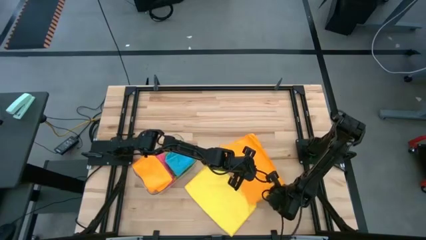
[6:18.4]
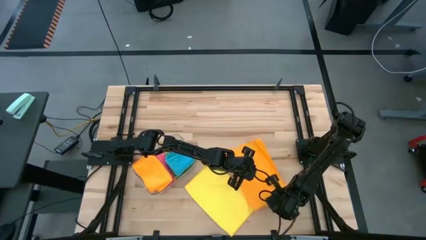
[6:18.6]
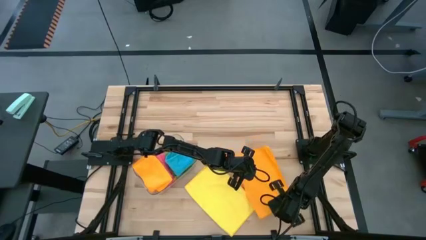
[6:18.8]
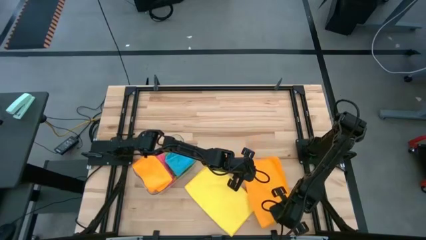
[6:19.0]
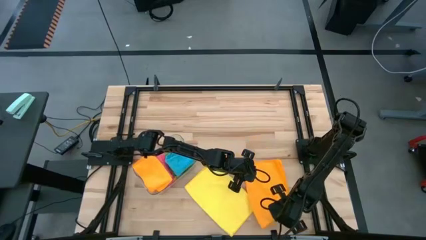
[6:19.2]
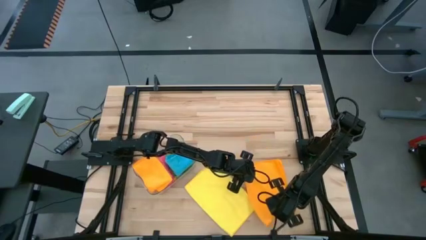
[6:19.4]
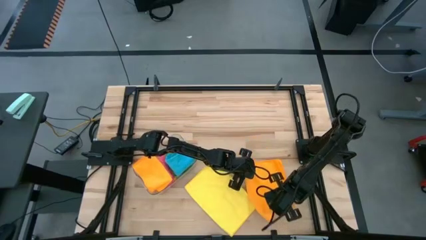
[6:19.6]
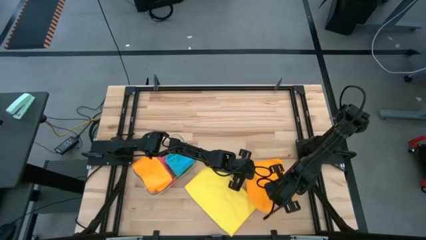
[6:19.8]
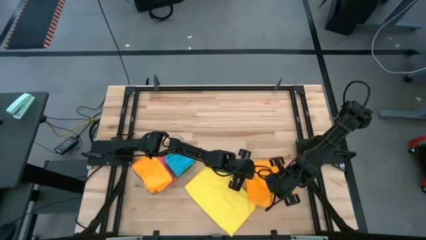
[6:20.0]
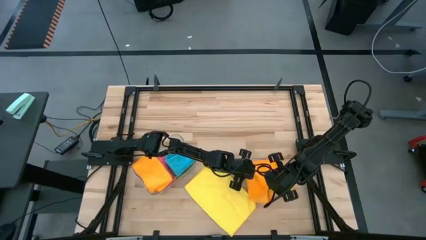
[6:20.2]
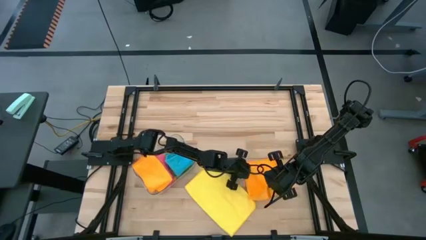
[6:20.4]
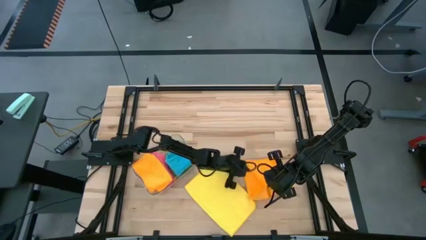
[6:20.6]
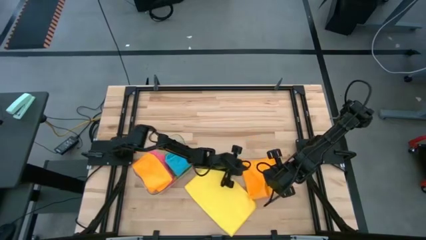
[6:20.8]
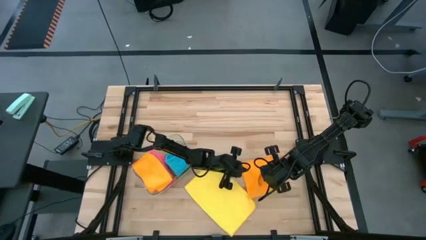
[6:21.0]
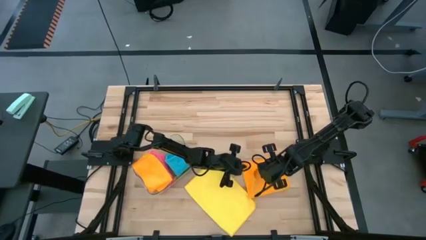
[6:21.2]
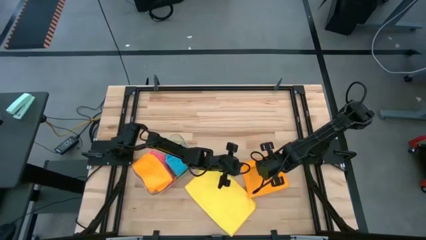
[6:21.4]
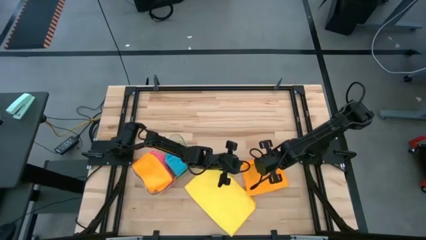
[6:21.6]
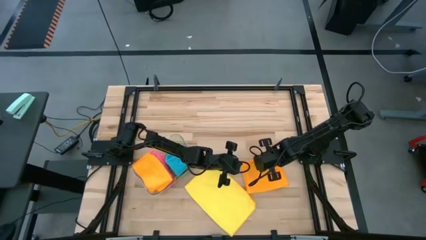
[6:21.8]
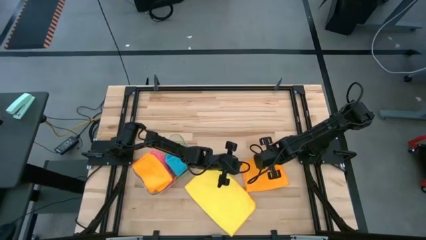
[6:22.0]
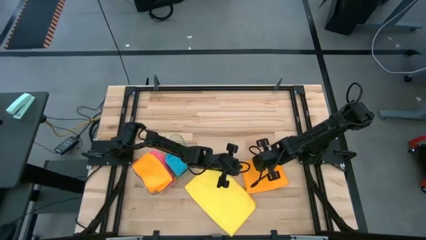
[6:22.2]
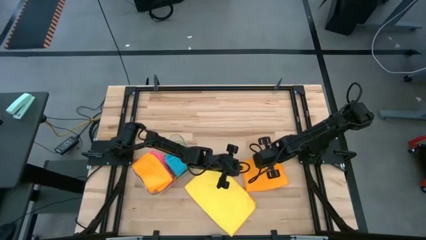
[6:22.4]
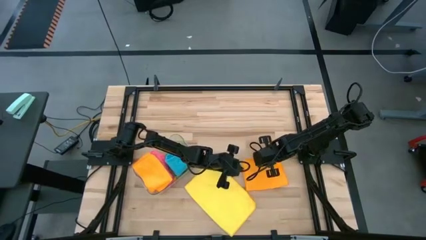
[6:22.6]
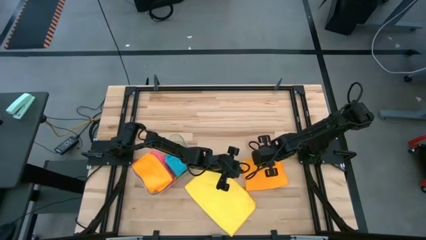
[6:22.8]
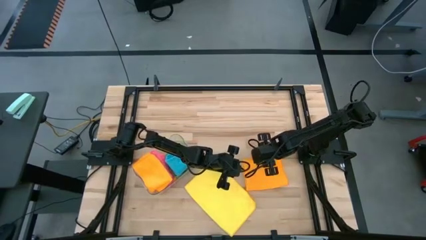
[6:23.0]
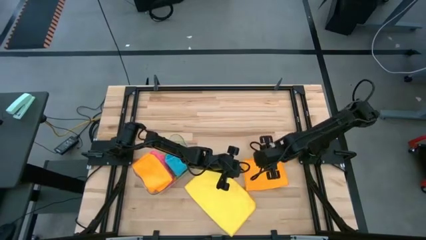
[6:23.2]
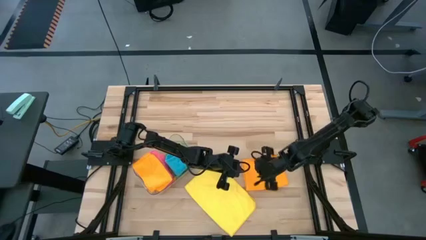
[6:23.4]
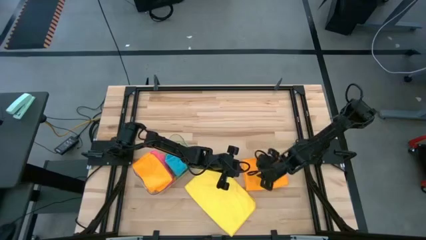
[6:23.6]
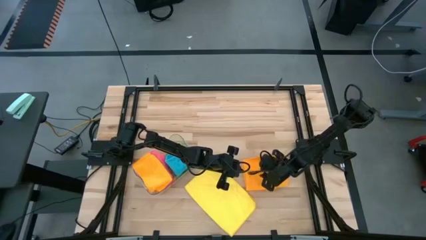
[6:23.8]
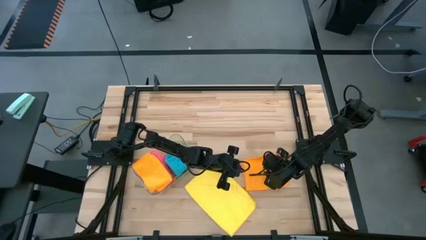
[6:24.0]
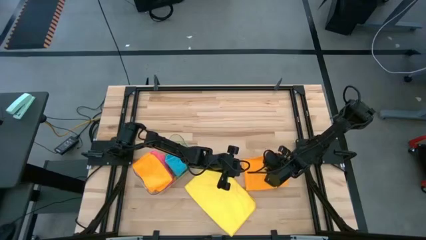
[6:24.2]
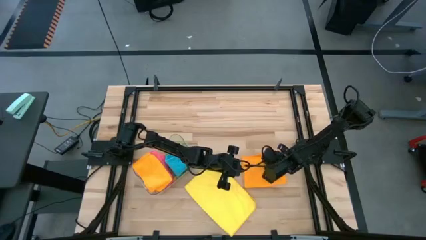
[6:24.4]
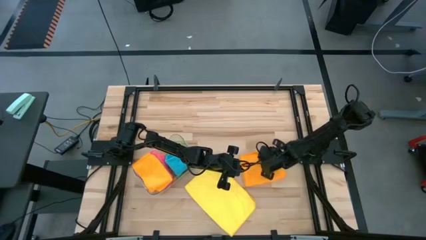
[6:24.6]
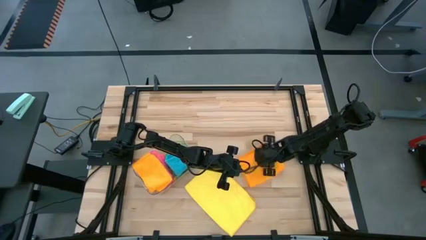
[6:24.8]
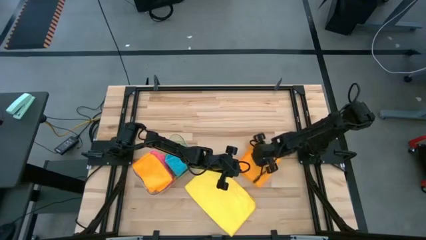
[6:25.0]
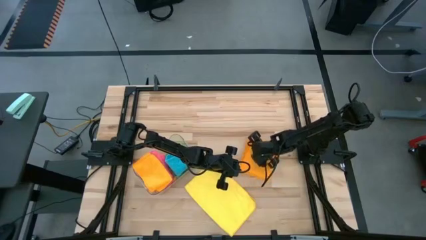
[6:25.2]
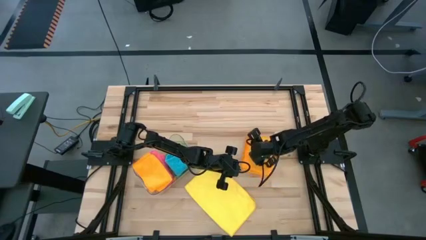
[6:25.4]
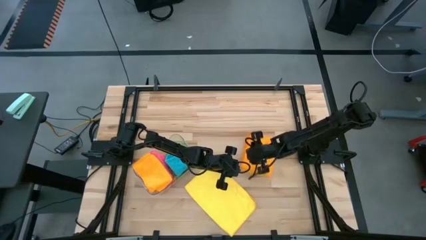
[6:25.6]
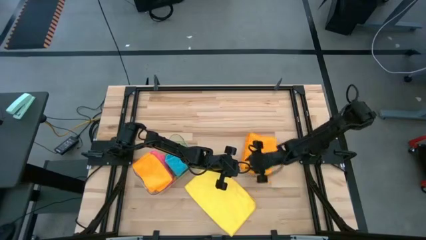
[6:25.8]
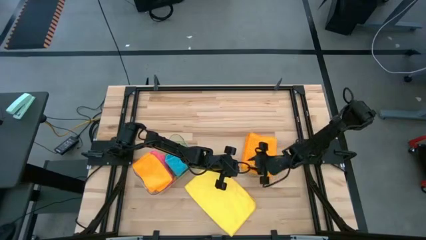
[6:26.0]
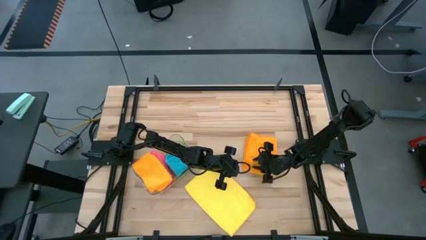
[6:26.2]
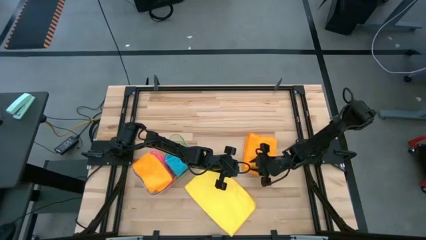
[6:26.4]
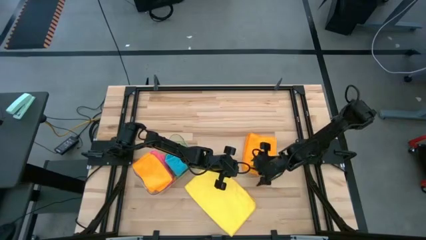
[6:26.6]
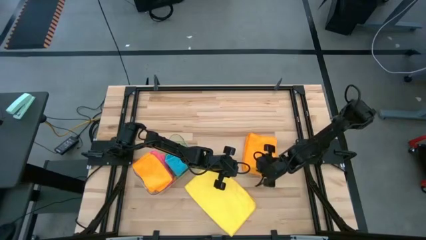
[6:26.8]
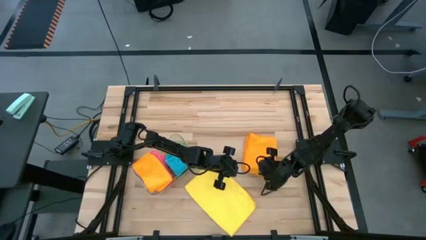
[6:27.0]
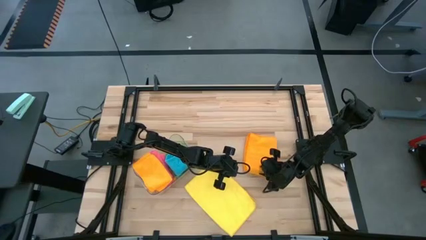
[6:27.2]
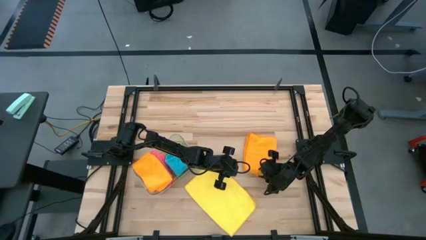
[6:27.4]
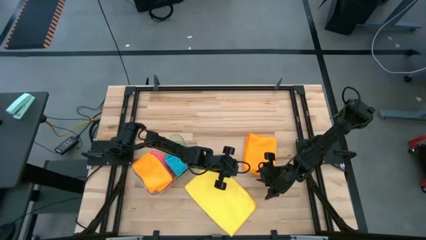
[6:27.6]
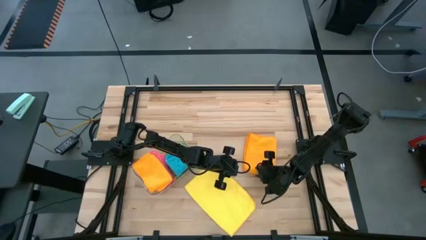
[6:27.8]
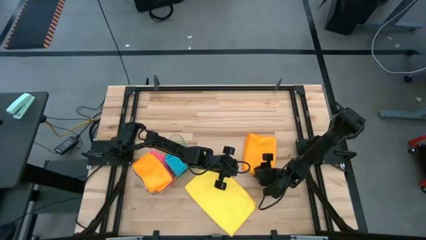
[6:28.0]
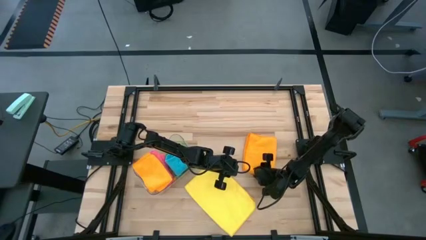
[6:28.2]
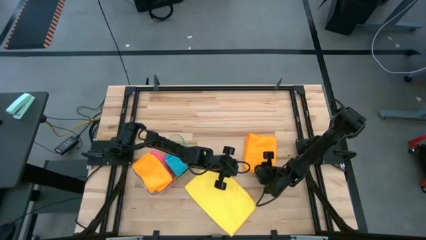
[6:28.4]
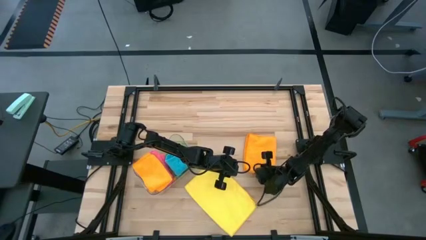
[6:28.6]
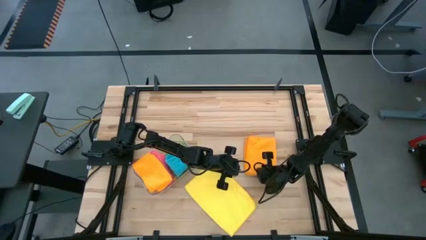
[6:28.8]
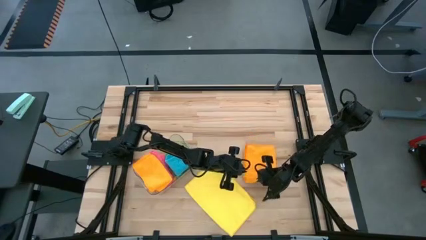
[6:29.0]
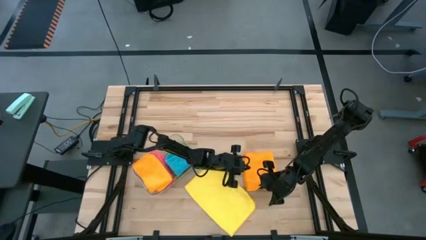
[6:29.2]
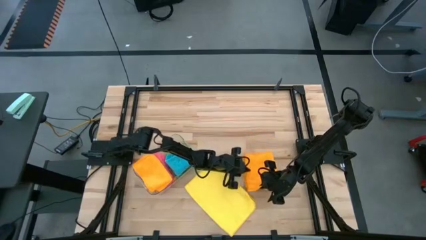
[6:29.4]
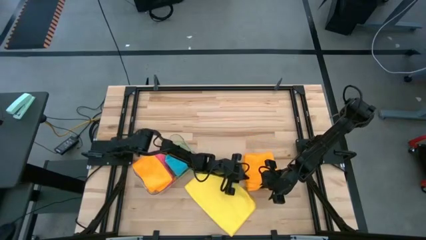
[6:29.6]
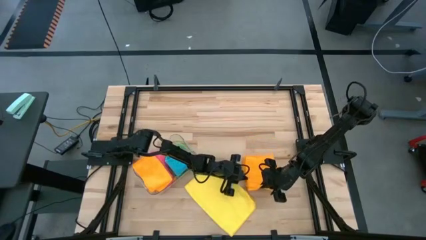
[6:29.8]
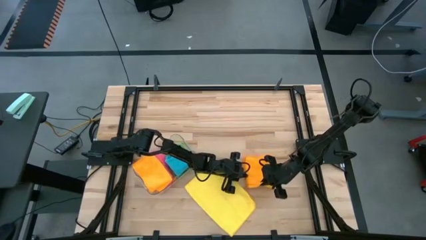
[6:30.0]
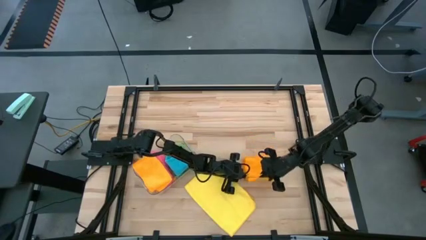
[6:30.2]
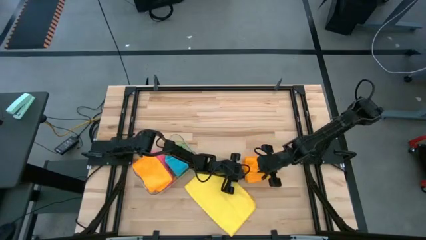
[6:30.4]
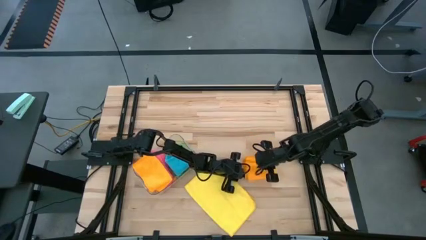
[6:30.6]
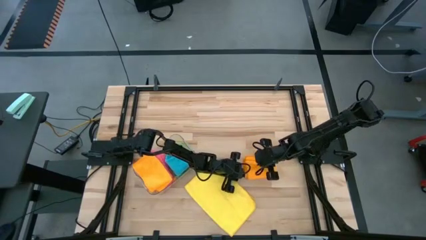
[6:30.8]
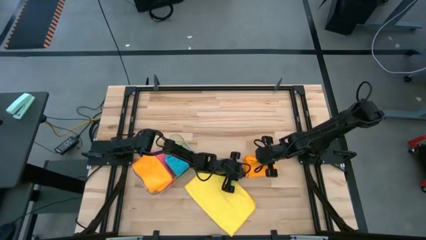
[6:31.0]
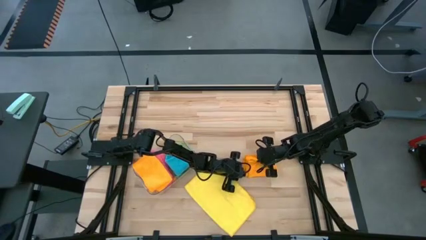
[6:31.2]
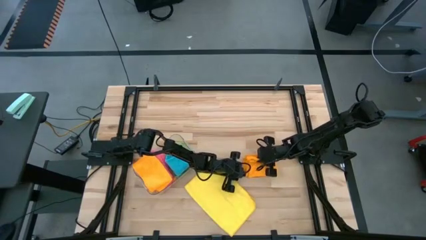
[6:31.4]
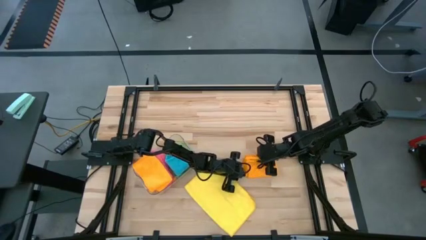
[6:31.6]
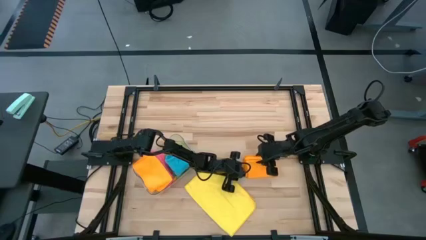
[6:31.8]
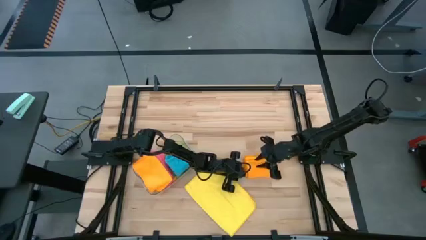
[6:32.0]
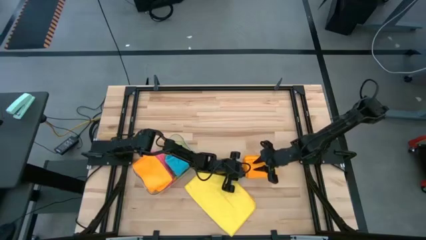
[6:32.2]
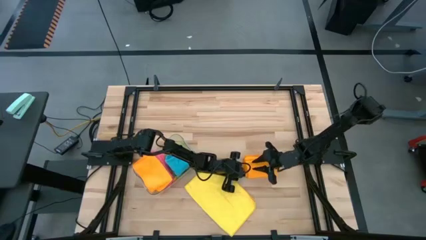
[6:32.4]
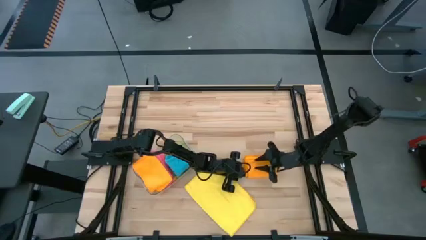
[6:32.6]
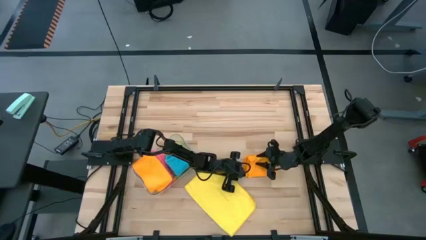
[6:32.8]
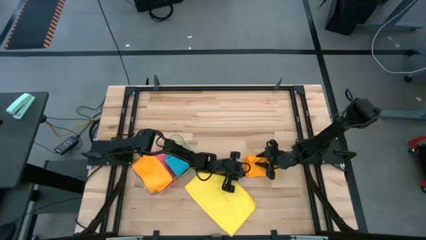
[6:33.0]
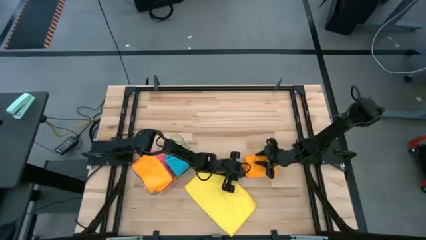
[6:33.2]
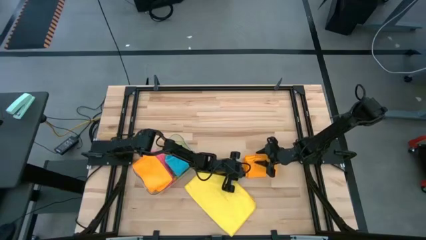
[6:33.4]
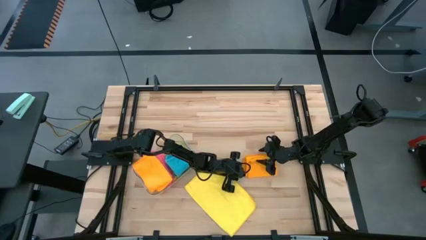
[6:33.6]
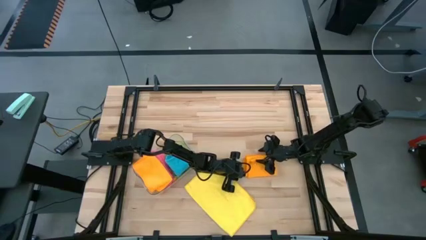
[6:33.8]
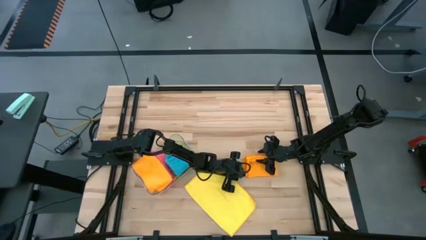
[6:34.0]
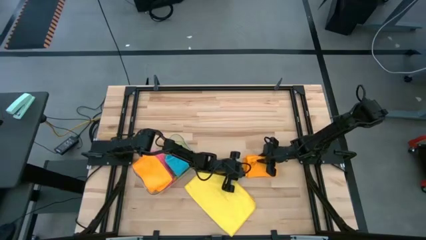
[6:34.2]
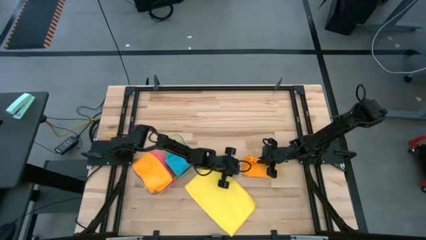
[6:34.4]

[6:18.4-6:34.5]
Task: Fold microfiber towels
Fold the orange microfiber cloth
